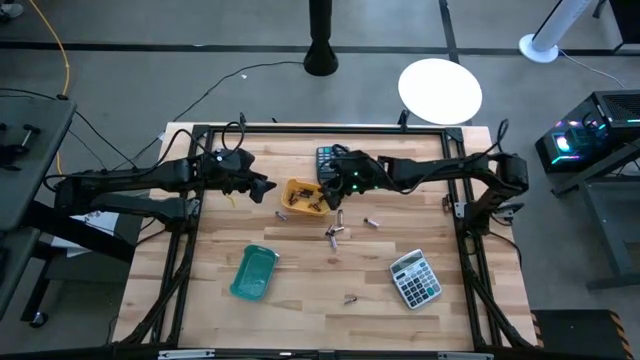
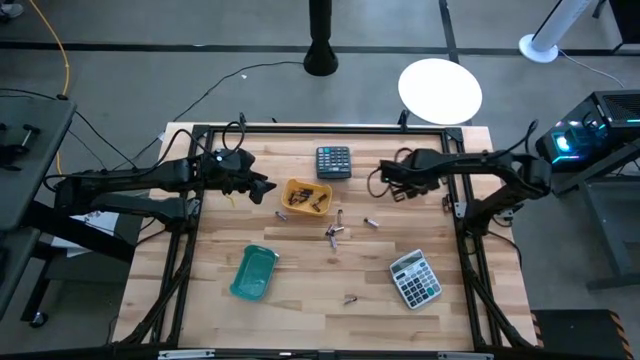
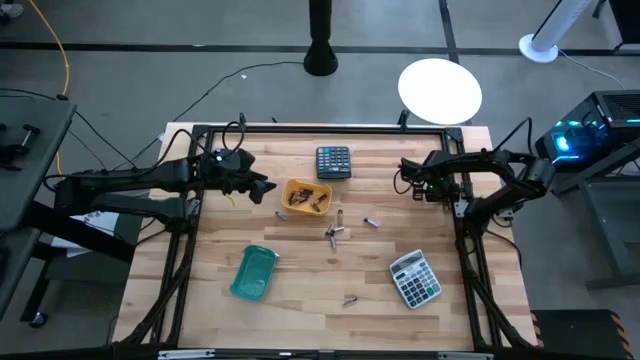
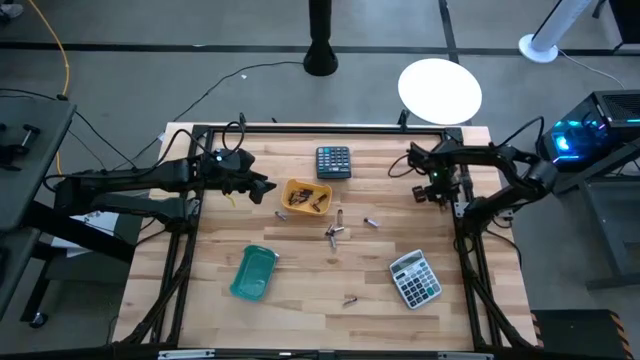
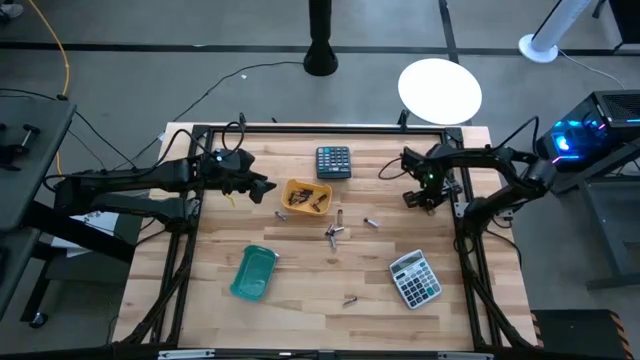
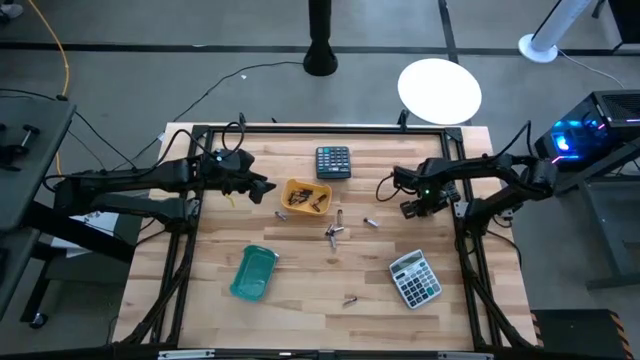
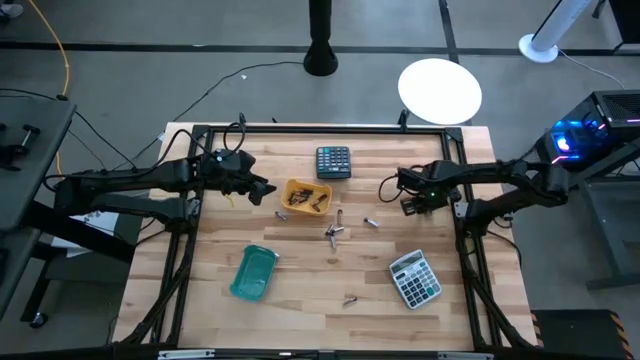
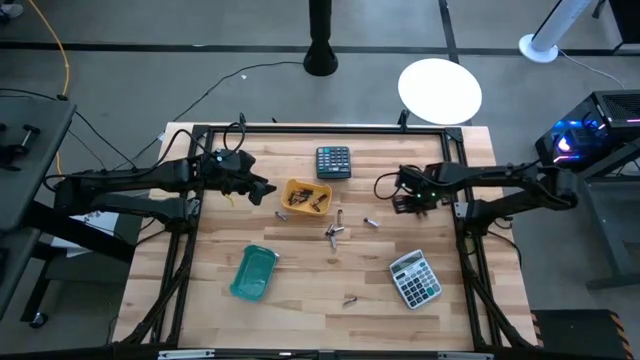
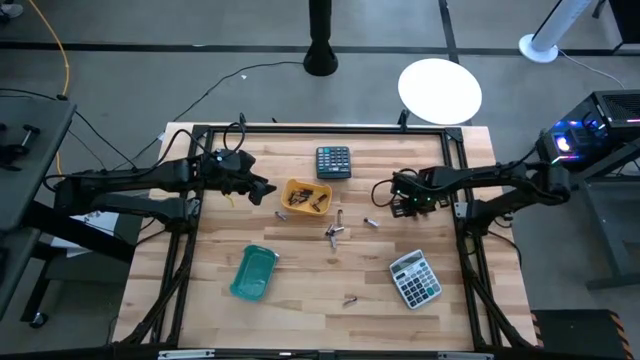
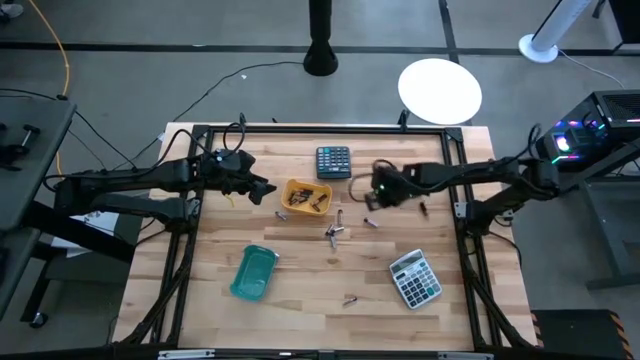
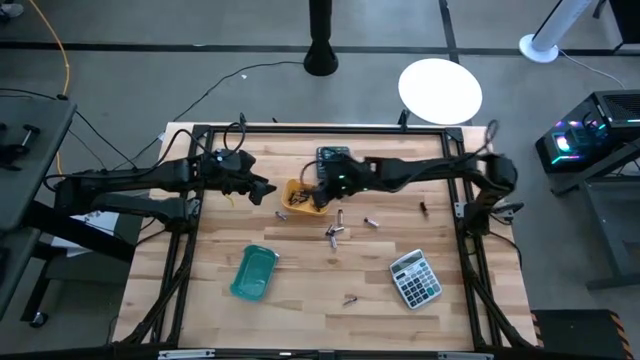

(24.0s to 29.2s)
Task: Sort batteries
Put the black battery into the yellow bin

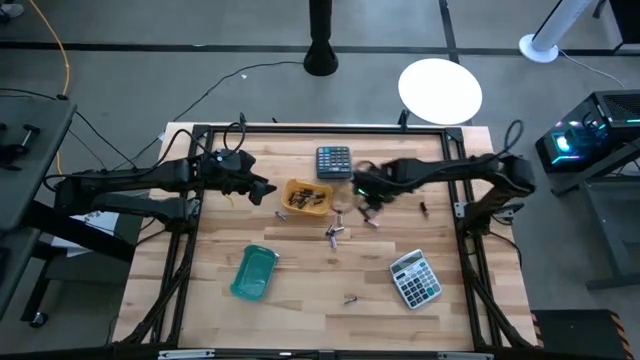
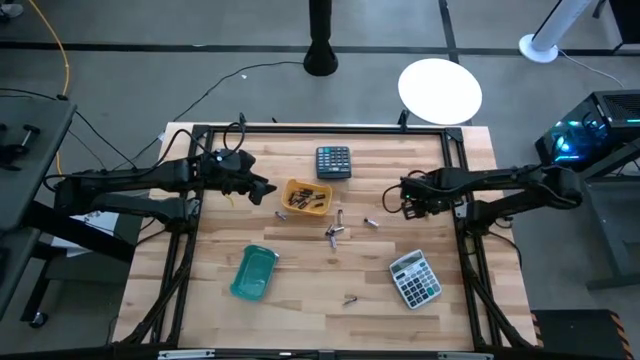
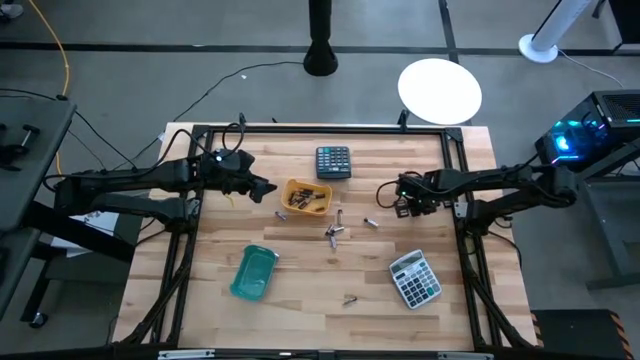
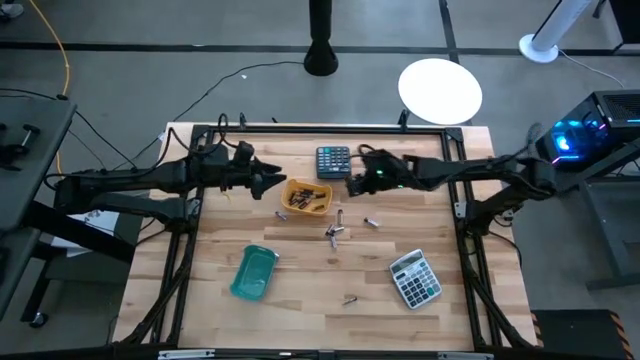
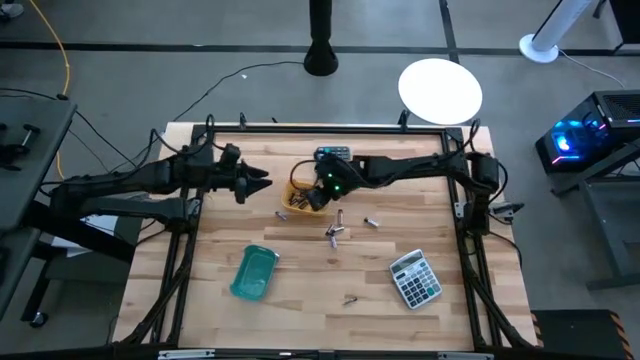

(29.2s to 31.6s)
Put the black battery into the yellow bin

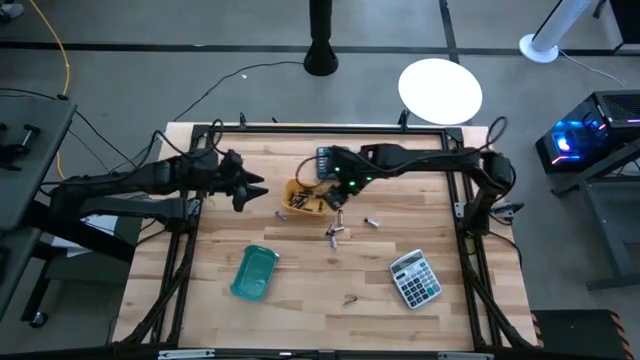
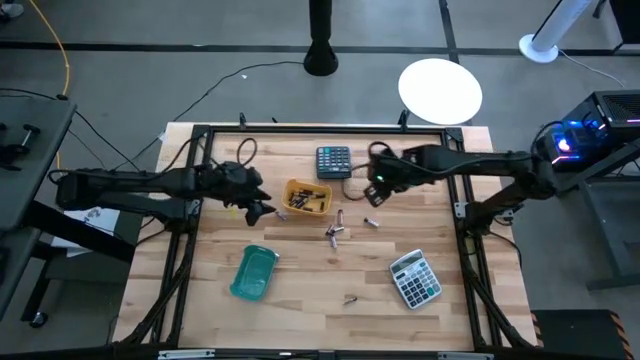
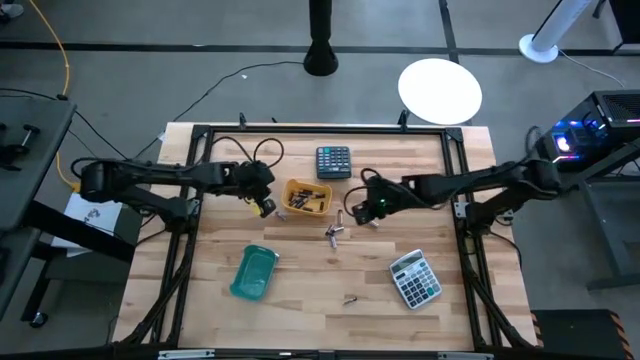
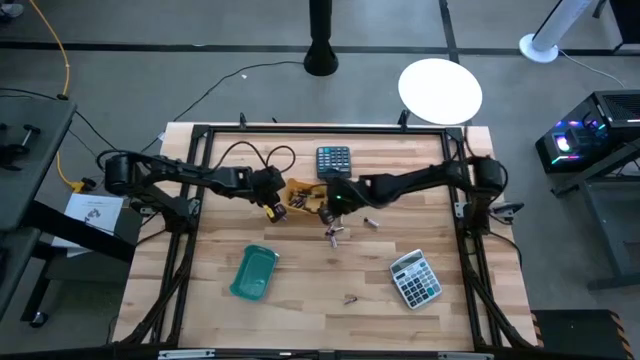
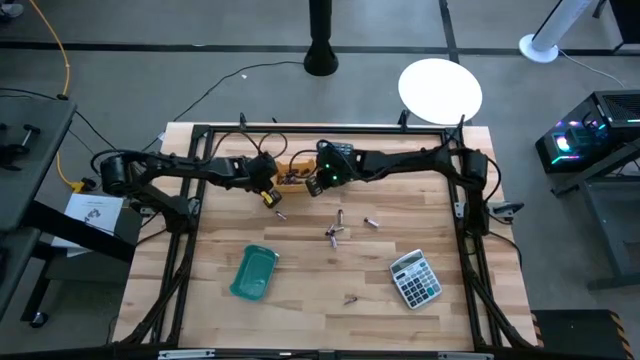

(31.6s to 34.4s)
Adjust the yellow bin

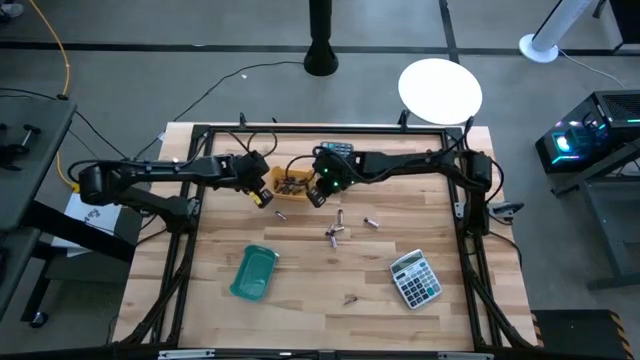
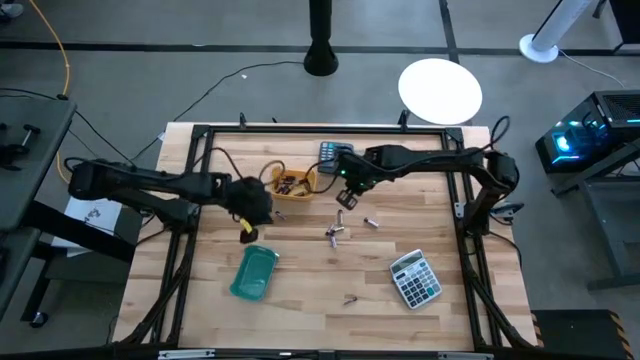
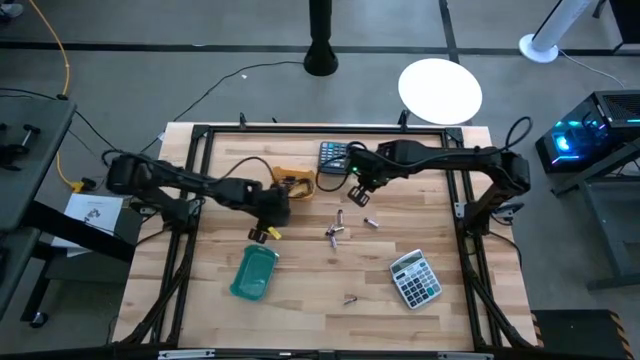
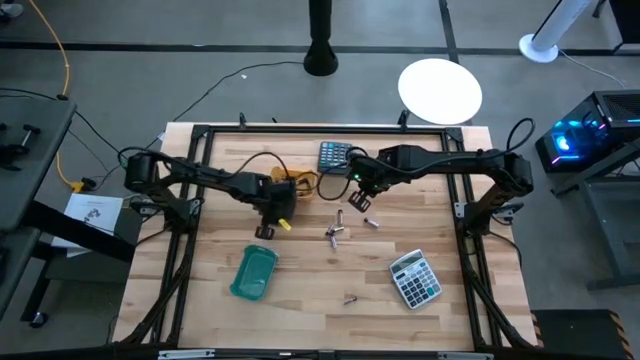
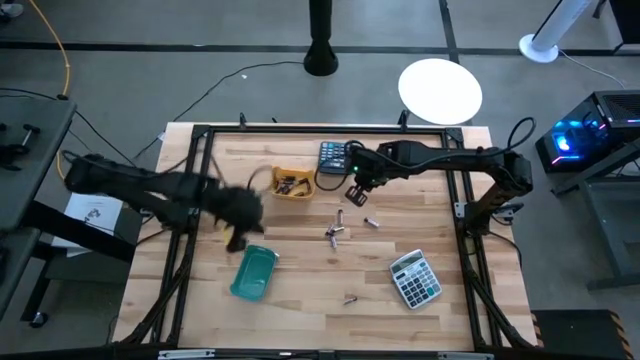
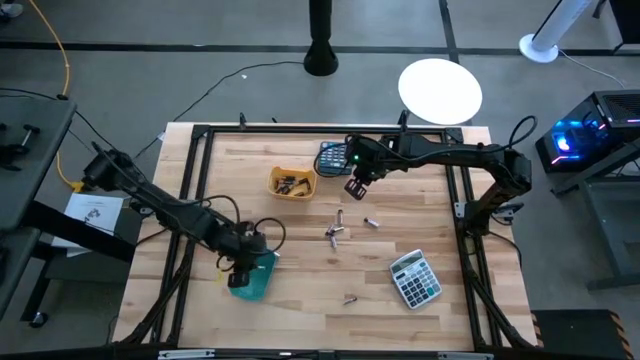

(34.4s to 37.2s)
Put the silver battery into the green bin

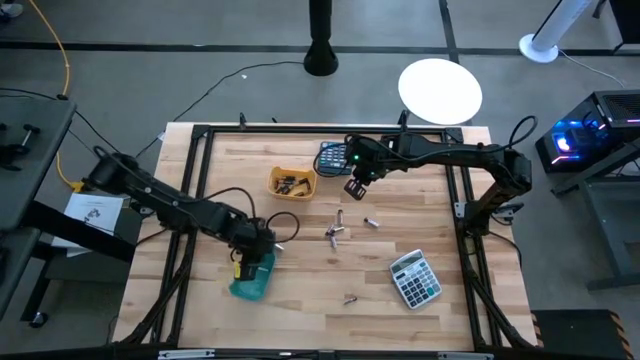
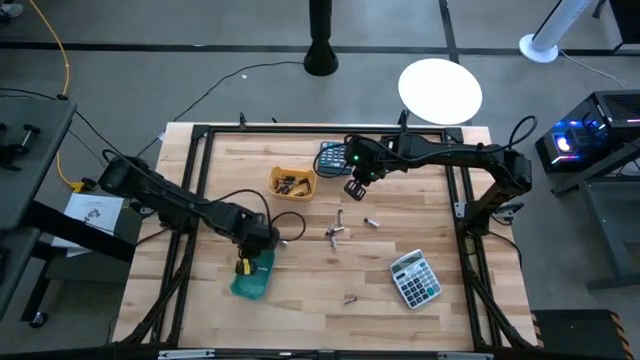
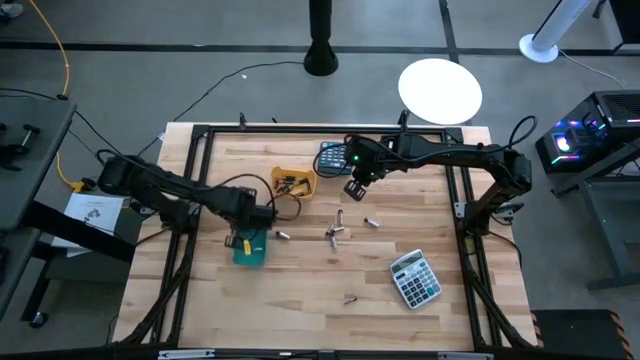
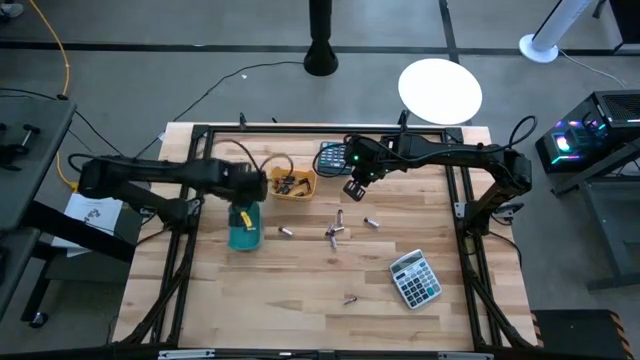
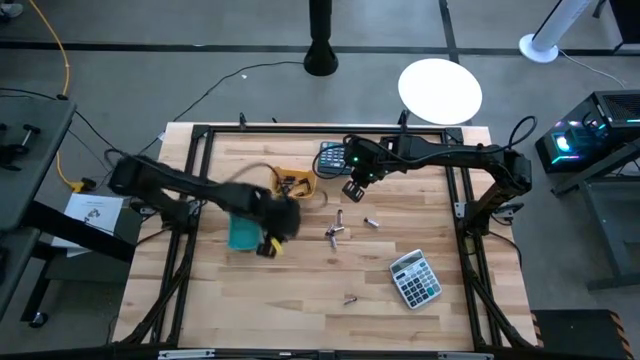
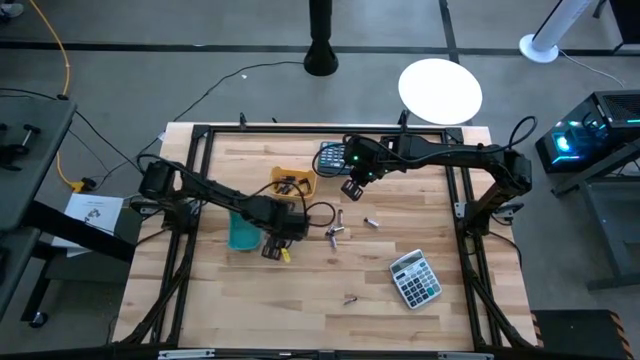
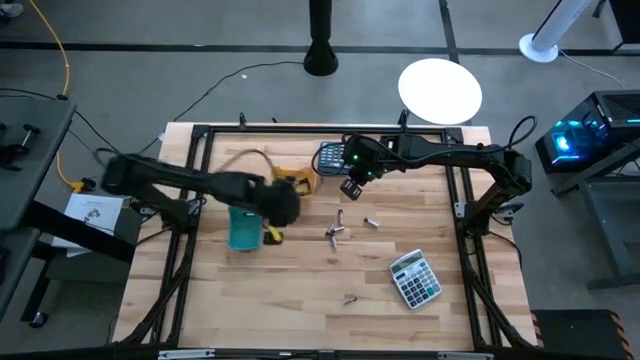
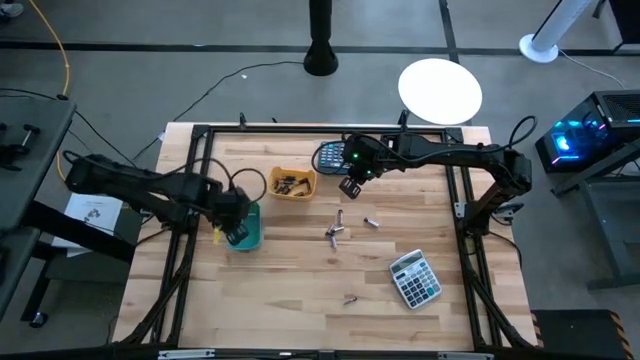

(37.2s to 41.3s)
Put the silver battery into the green bin

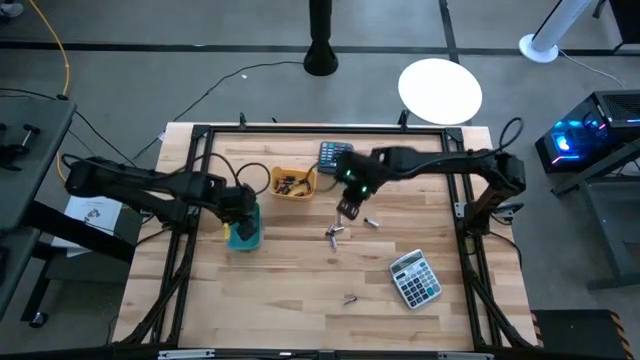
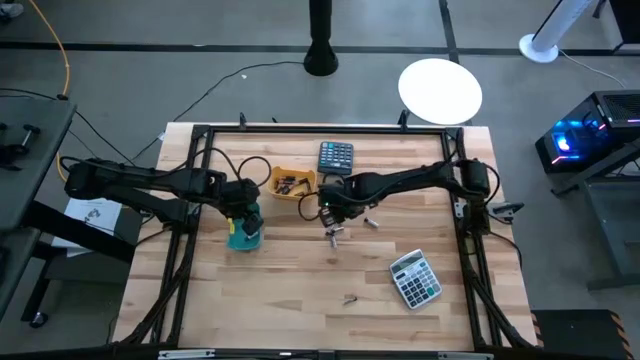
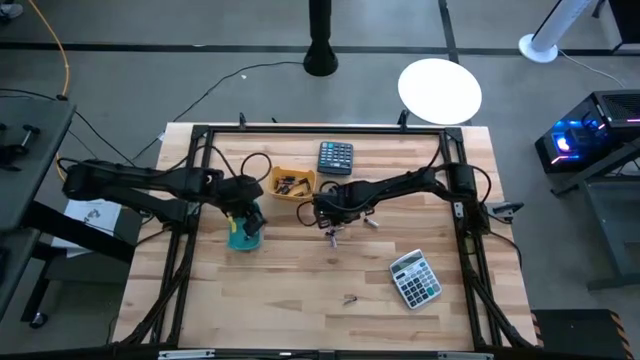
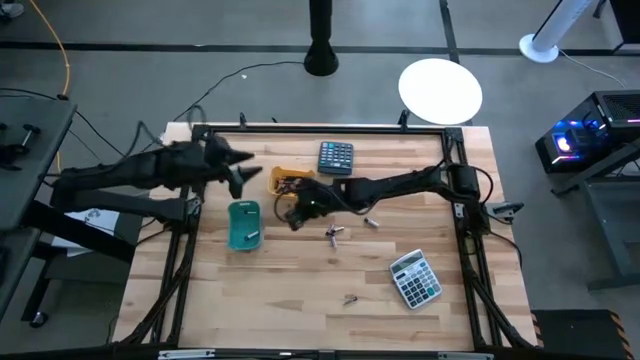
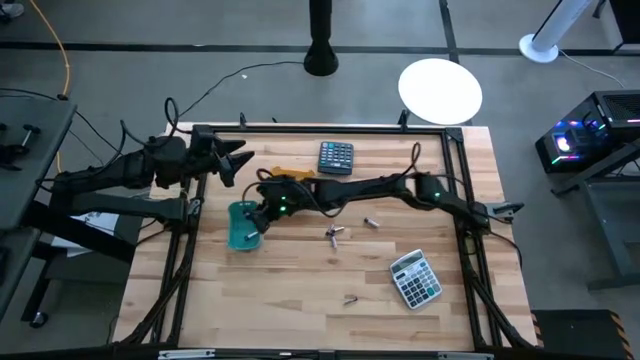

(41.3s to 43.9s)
Put the silver battery into the green bin

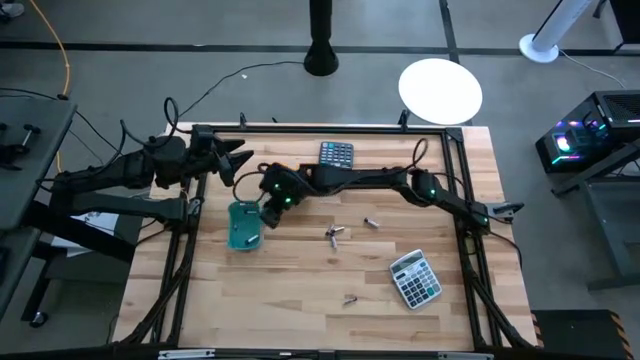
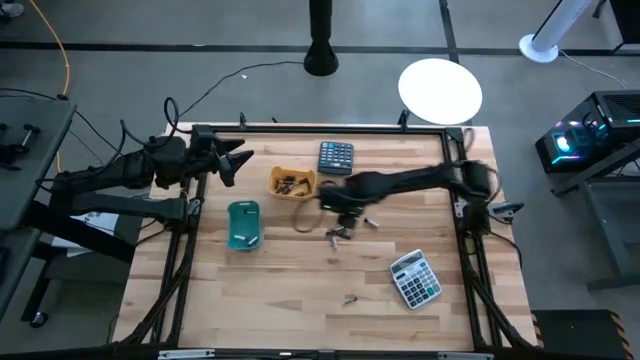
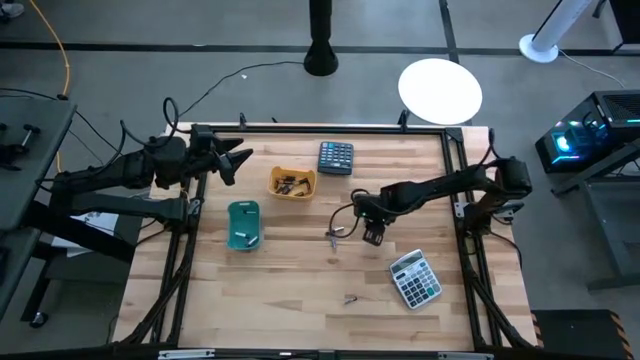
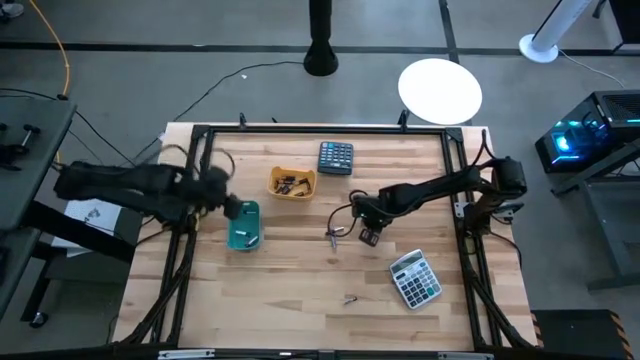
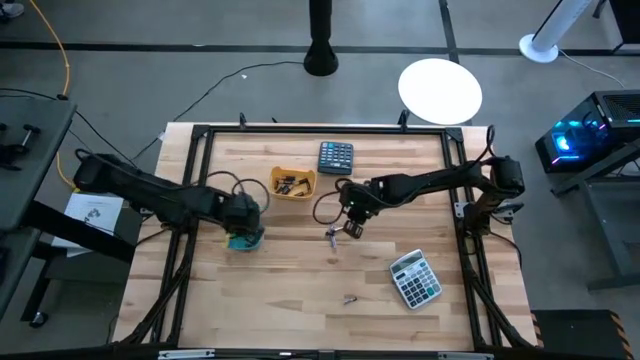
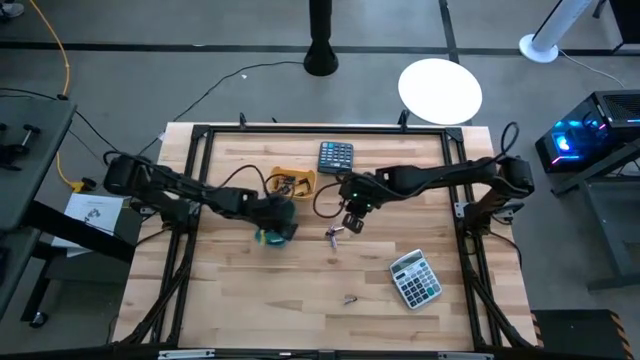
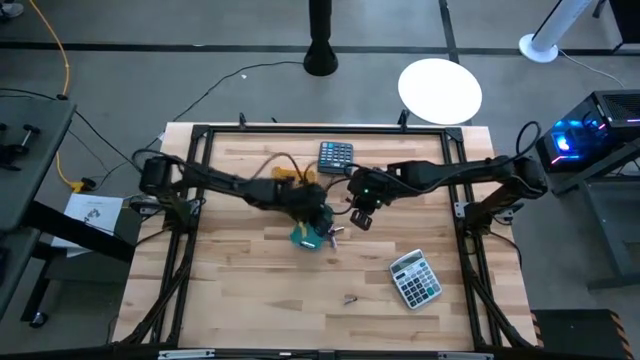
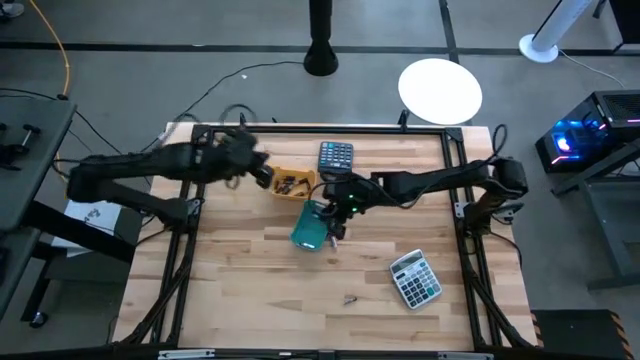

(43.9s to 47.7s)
Put the silver battery into the green bin
